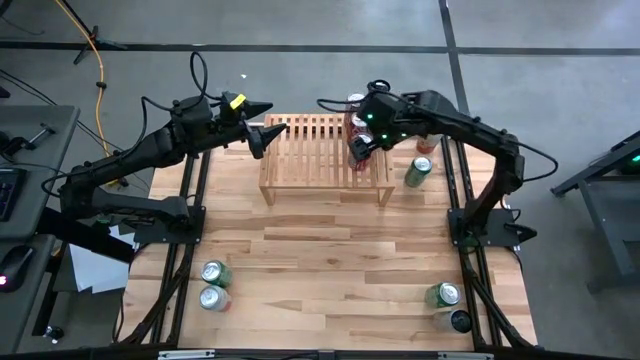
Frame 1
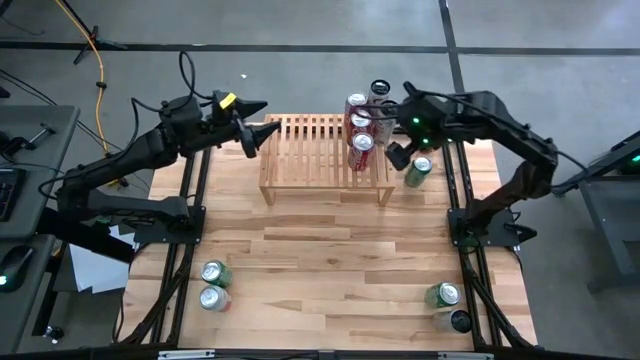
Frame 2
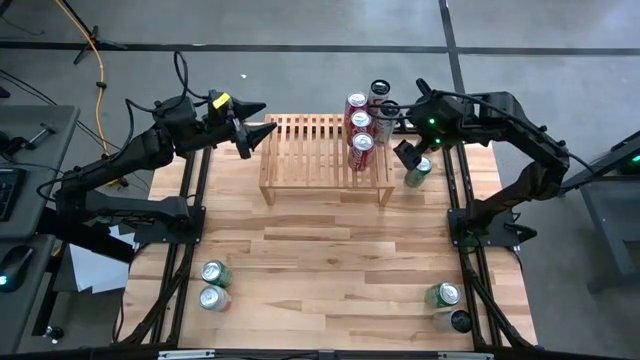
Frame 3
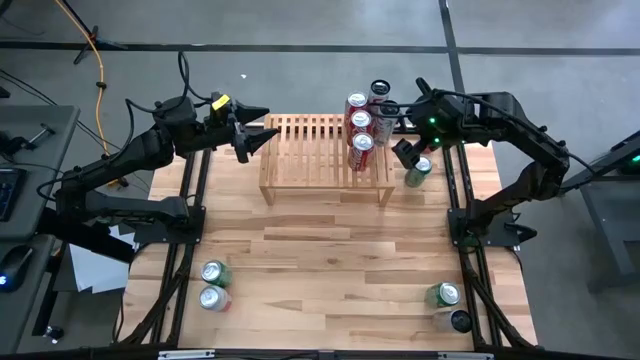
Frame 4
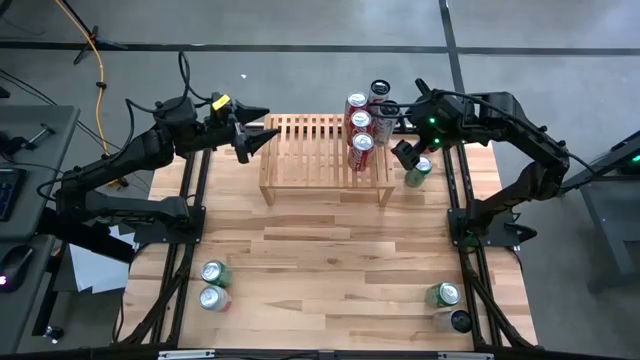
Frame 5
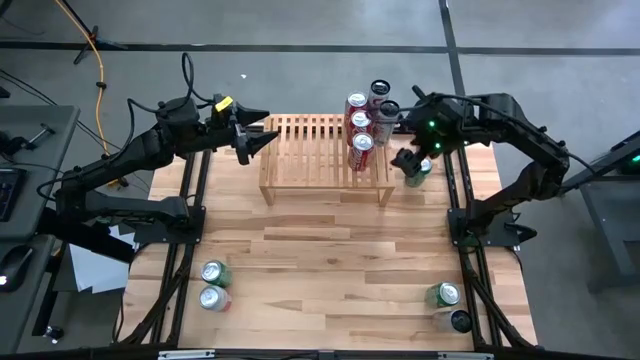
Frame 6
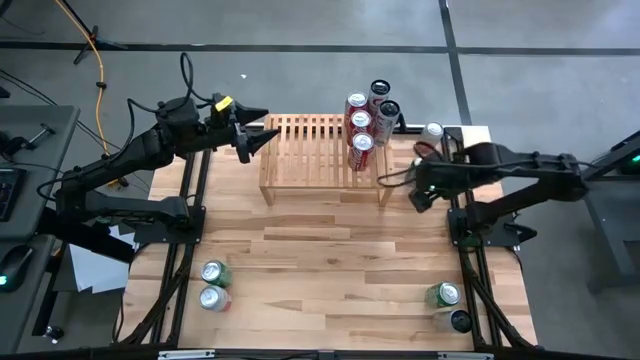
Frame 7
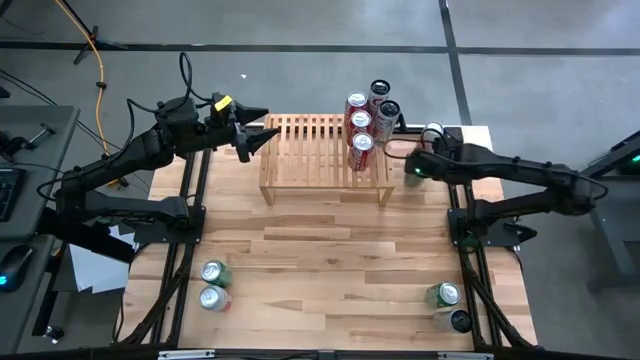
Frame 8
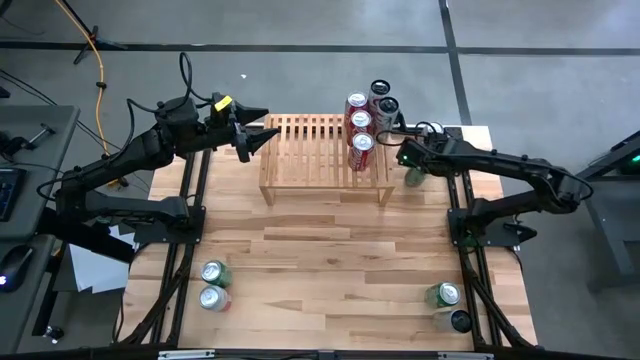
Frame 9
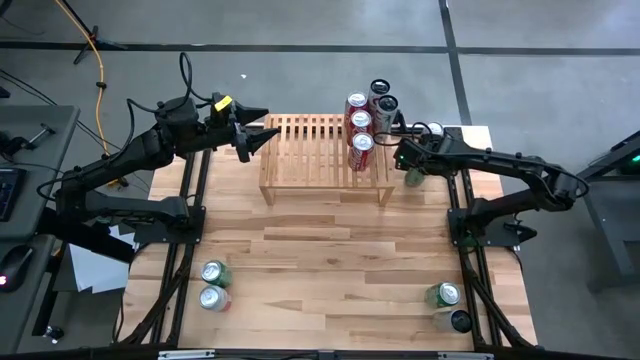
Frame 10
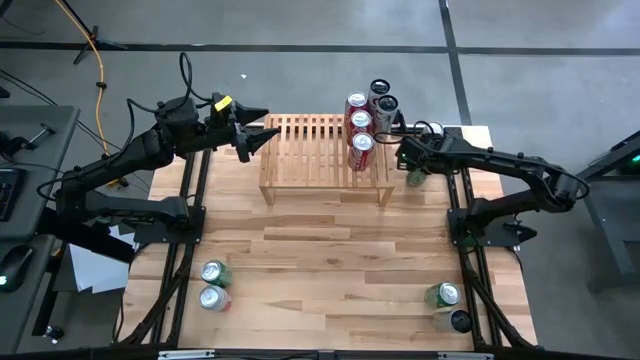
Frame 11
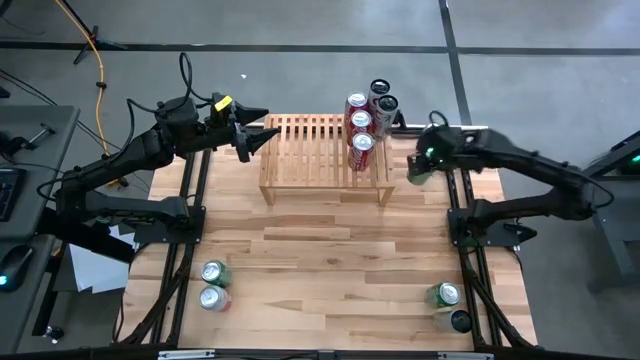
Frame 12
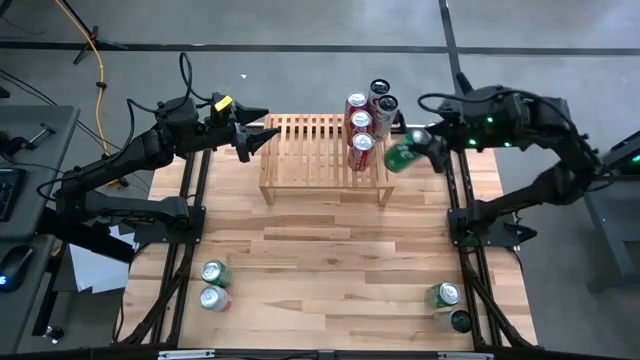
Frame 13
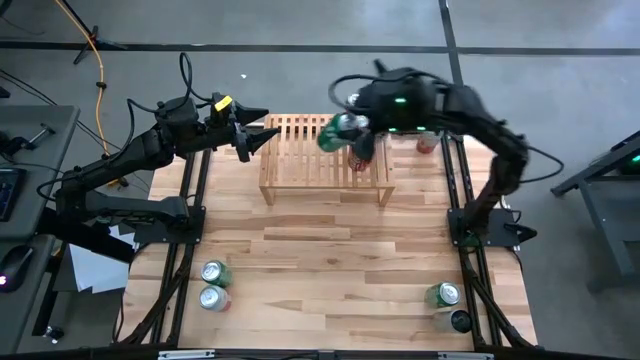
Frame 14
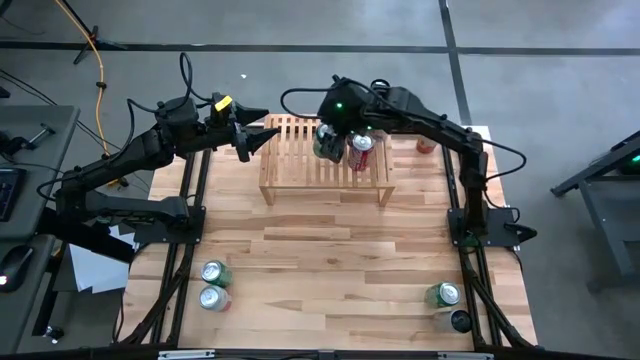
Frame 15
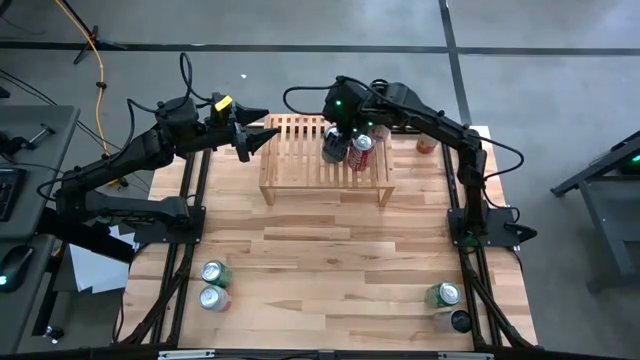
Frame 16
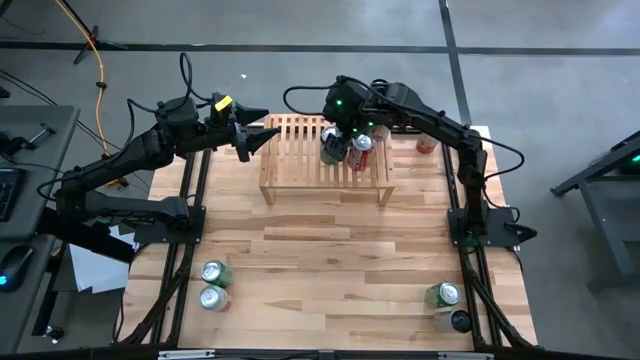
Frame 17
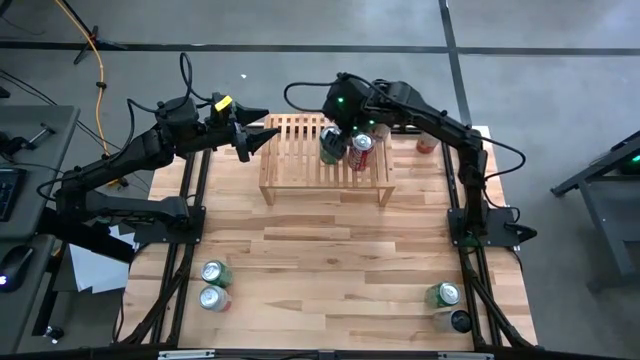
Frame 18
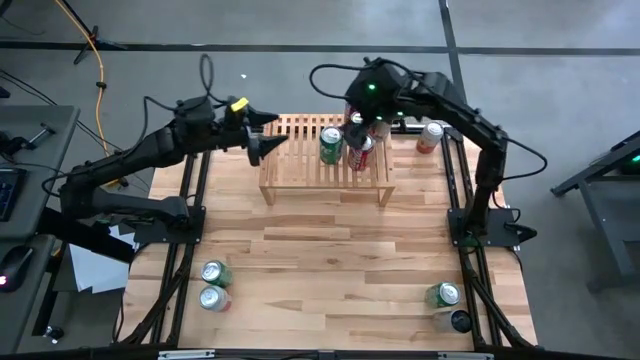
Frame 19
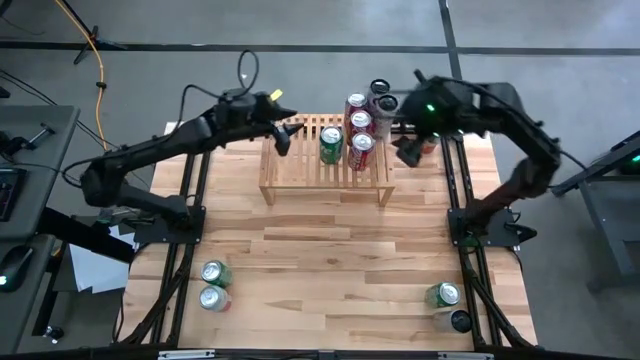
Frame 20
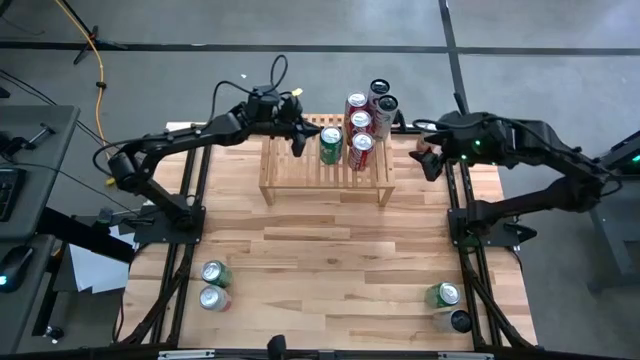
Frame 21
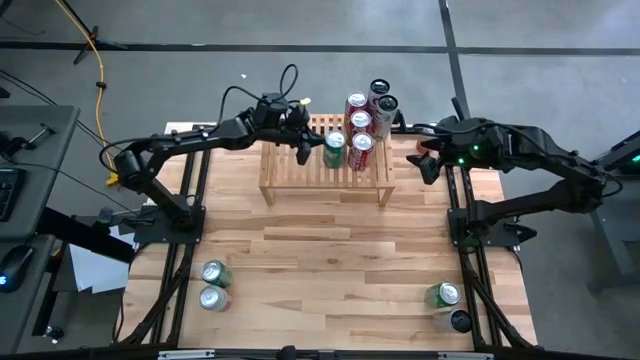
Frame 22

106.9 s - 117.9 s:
Task: Place canned beverage on shelf
Put the top right green soda can on the shelf

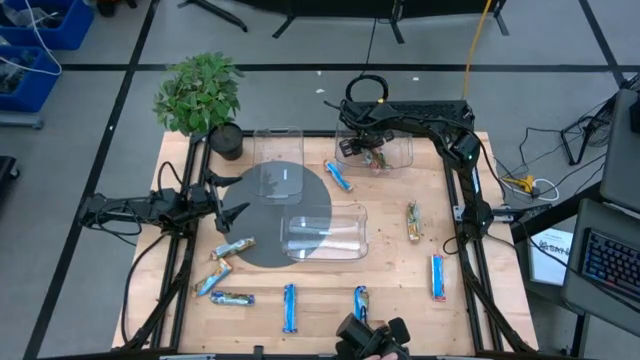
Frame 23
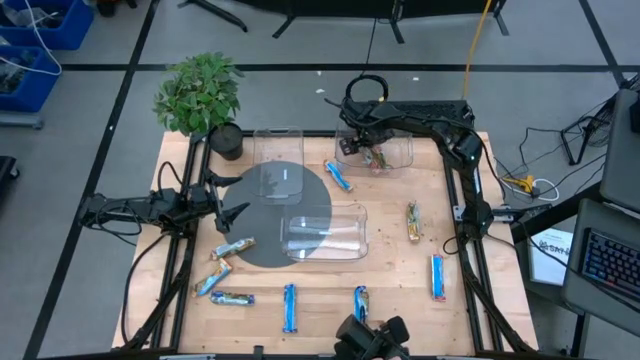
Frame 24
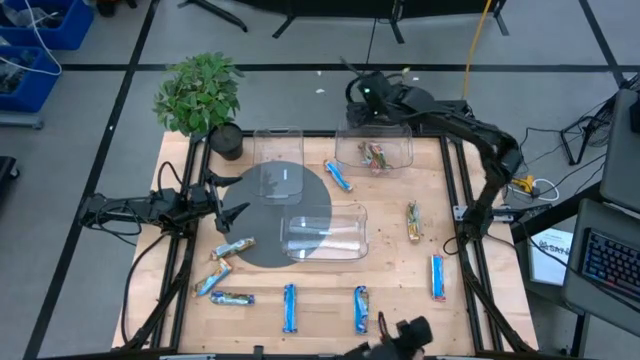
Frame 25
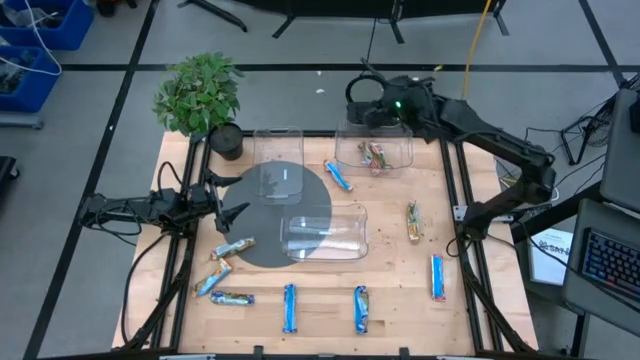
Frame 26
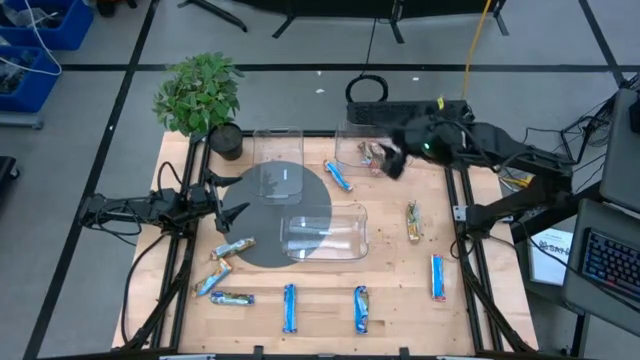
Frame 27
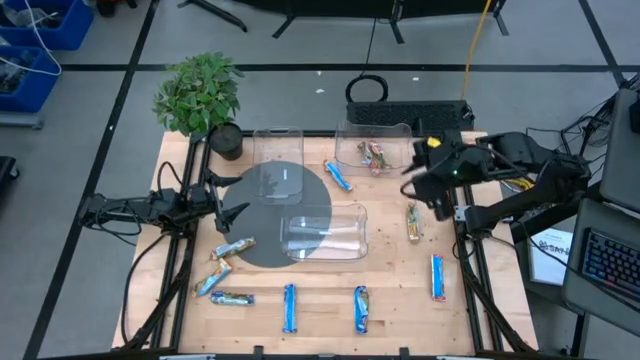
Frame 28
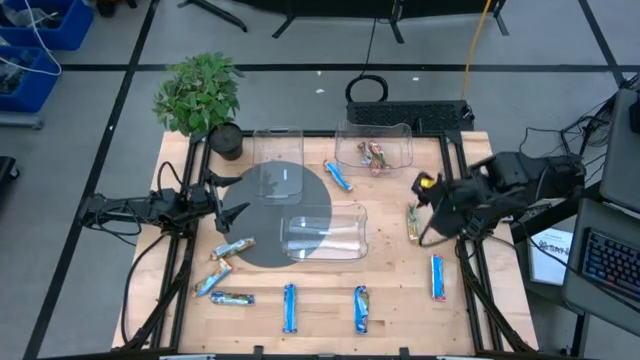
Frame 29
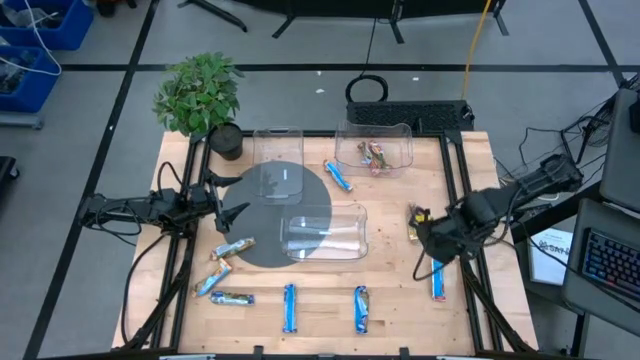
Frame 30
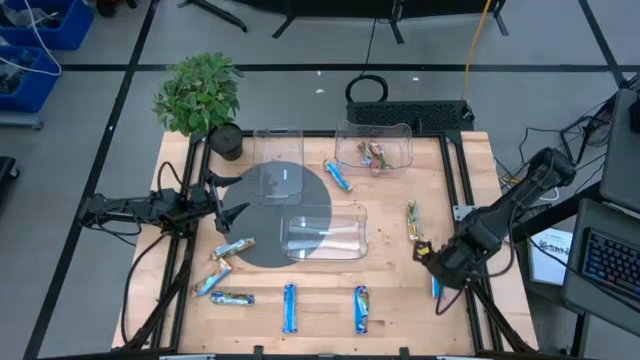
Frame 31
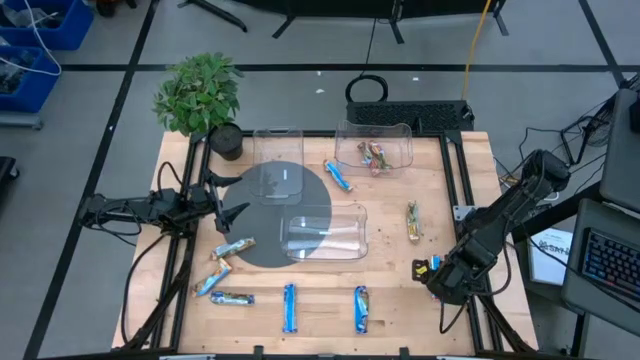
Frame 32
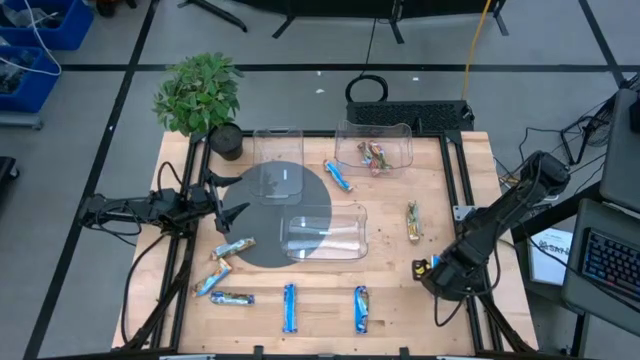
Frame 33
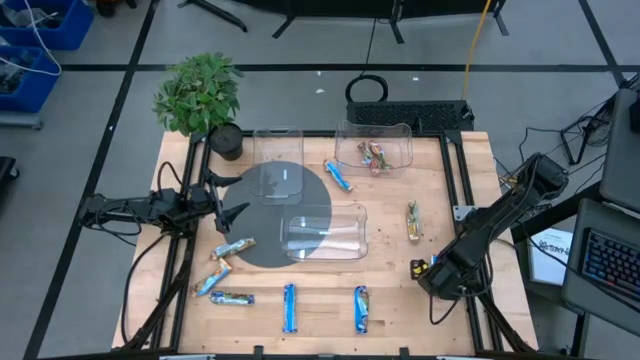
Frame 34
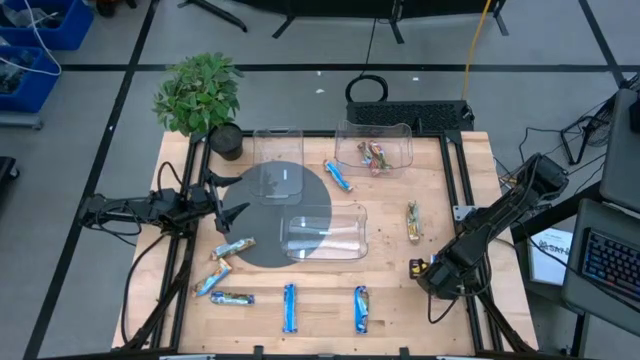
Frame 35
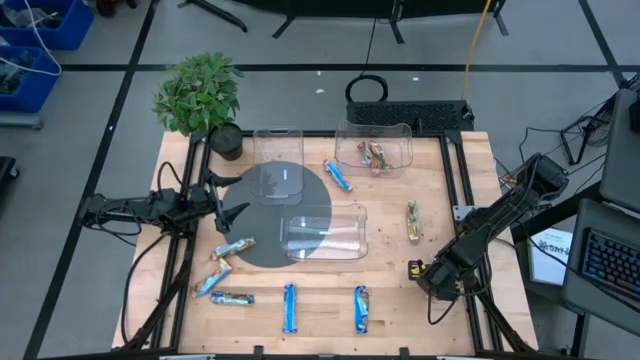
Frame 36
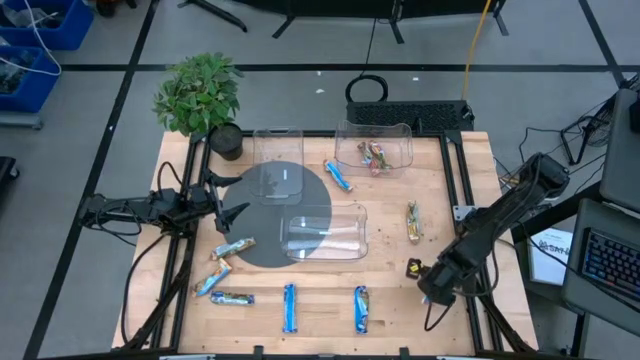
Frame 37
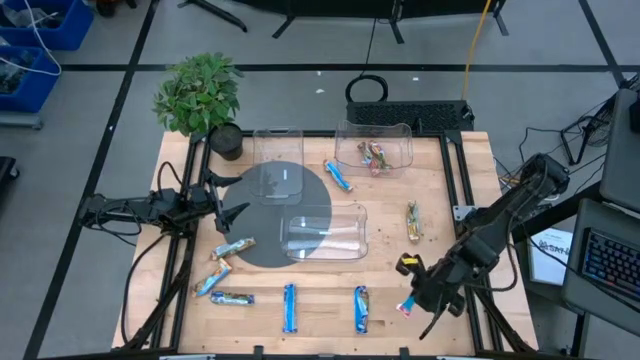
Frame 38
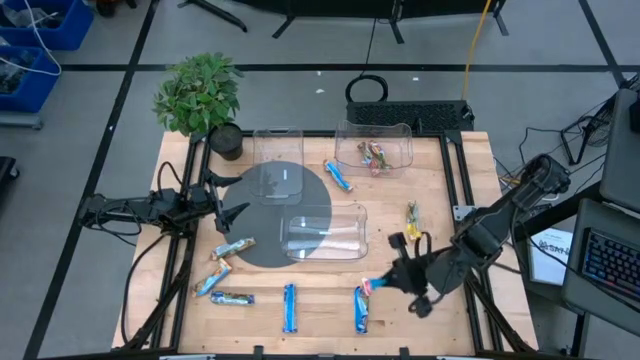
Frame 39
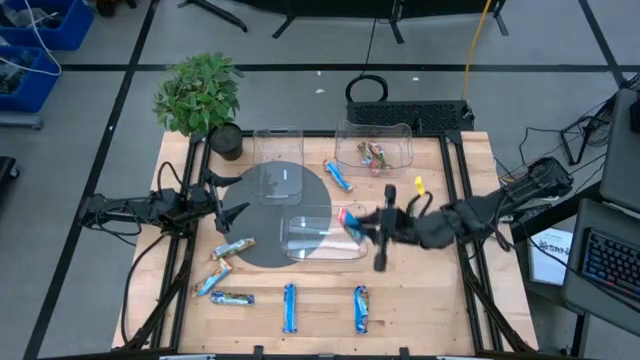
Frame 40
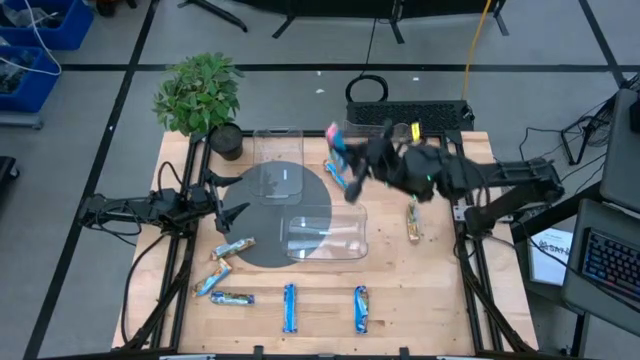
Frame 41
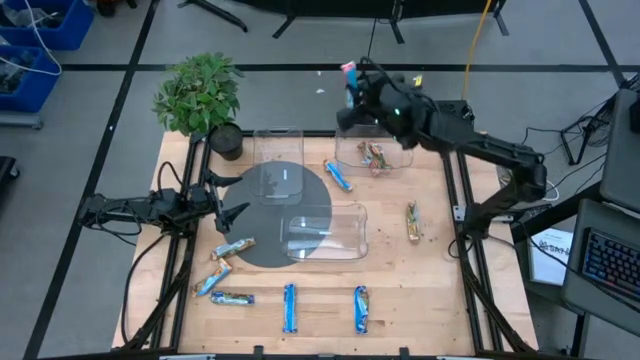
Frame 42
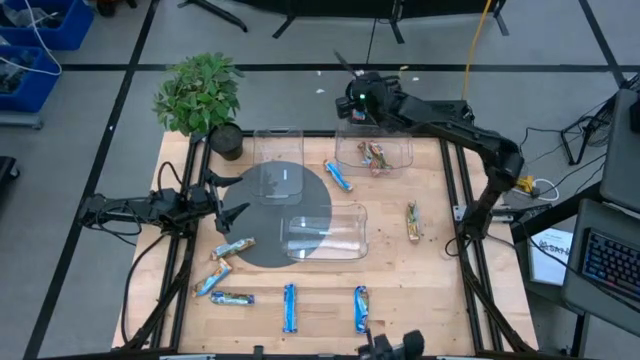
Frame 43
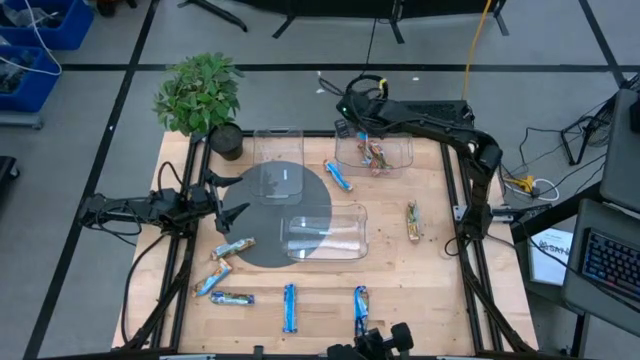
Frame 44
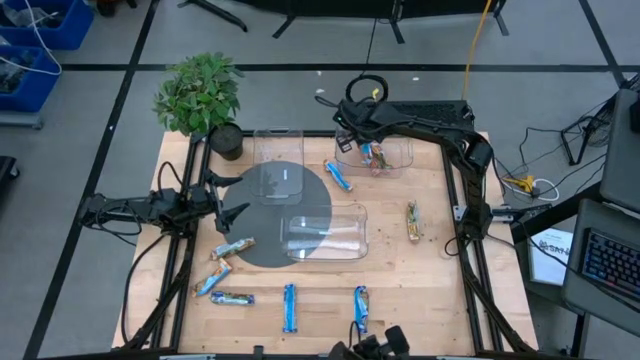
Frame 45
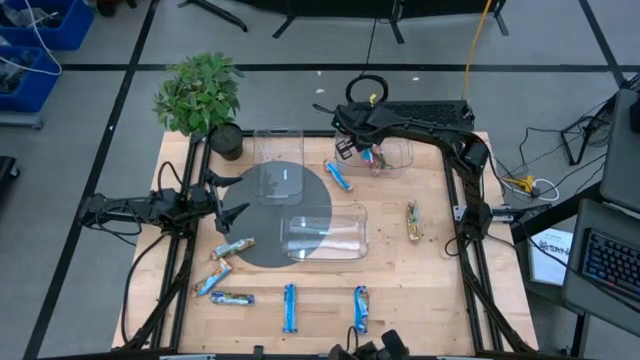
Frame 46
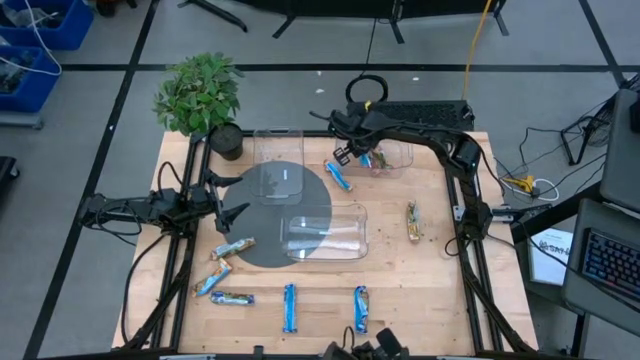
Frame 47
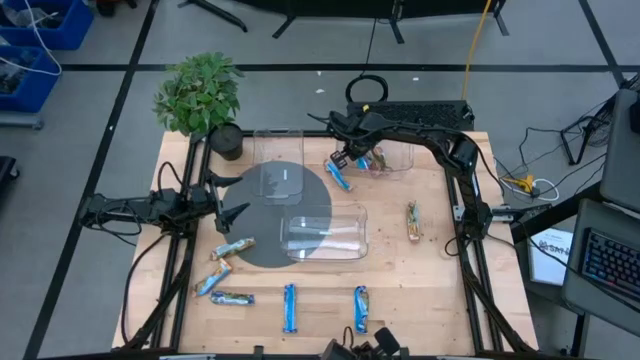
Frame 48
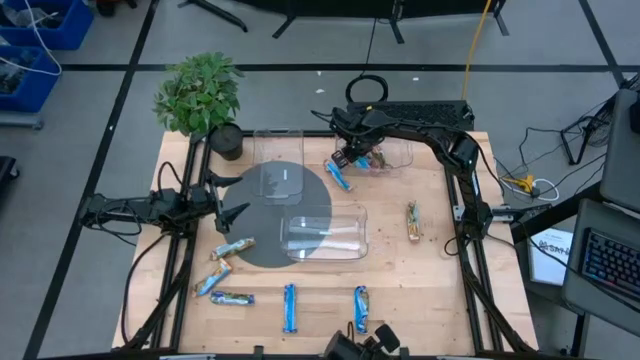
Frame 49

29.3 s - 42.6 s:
Task: Pick and place Granola Bars by type
Put the red granola bar into the top right transparent bin
